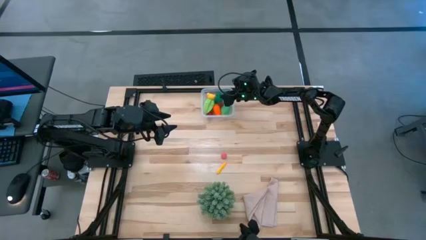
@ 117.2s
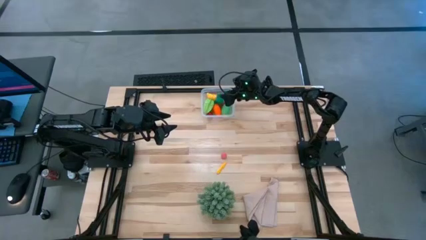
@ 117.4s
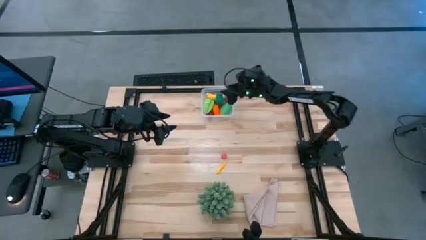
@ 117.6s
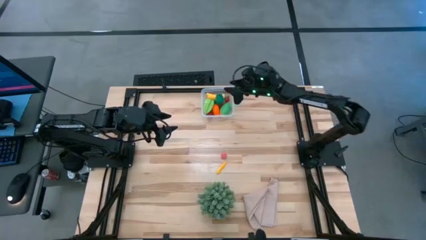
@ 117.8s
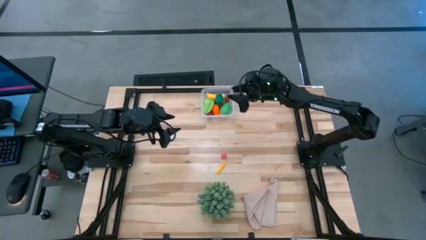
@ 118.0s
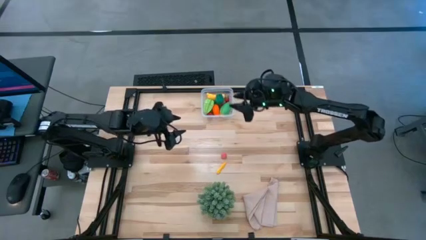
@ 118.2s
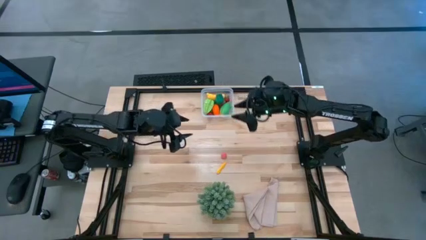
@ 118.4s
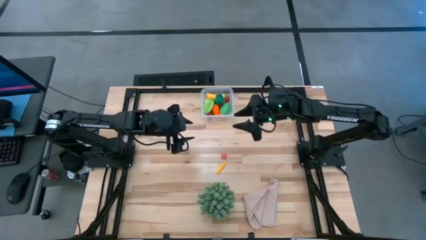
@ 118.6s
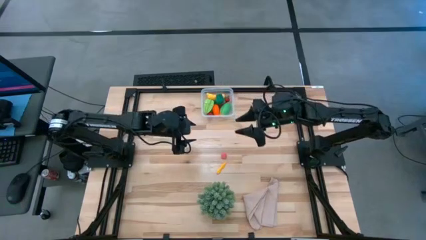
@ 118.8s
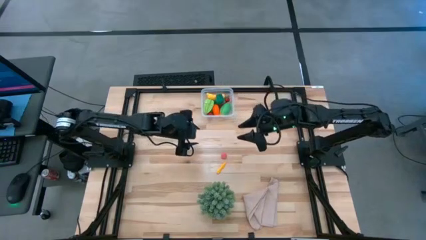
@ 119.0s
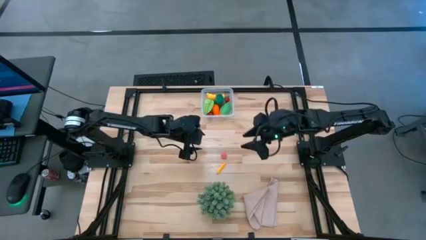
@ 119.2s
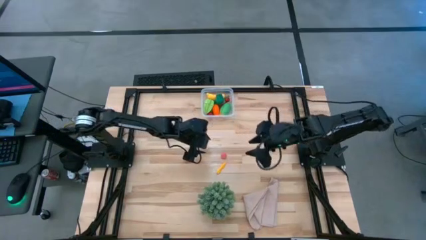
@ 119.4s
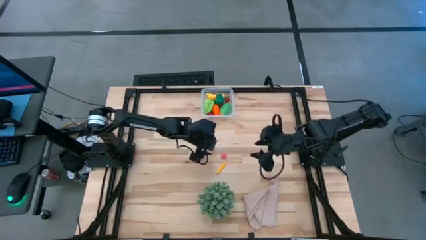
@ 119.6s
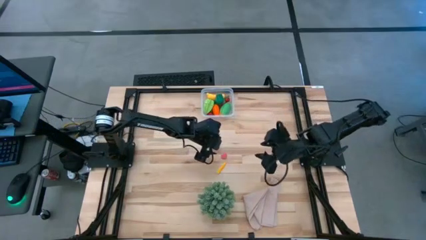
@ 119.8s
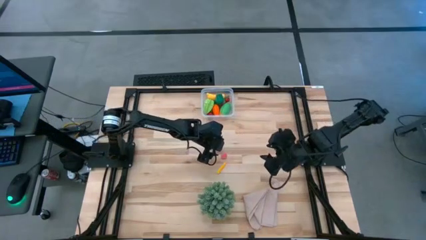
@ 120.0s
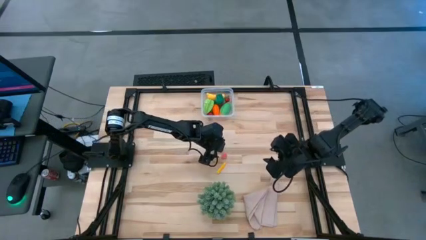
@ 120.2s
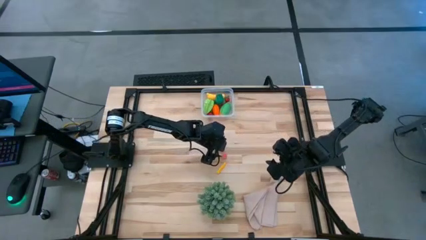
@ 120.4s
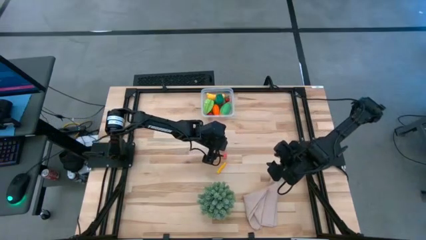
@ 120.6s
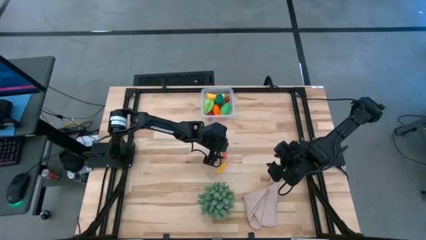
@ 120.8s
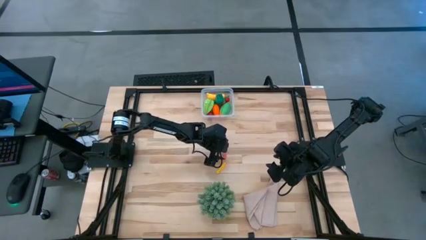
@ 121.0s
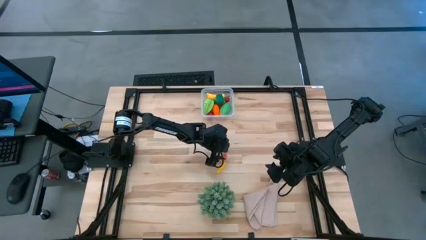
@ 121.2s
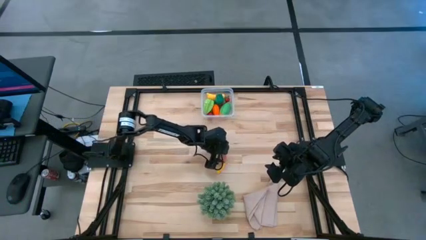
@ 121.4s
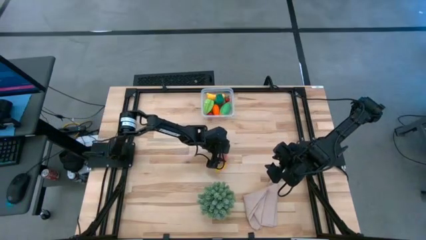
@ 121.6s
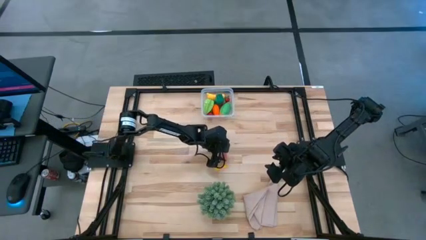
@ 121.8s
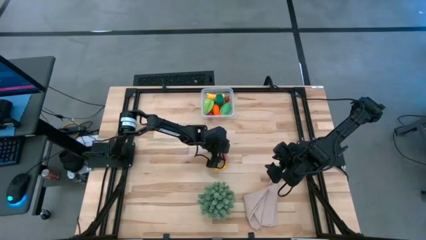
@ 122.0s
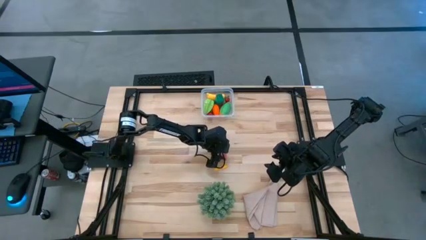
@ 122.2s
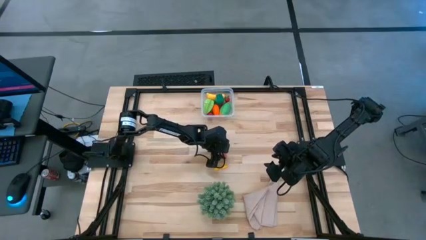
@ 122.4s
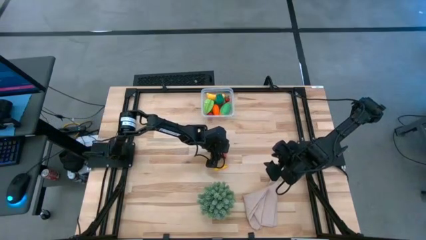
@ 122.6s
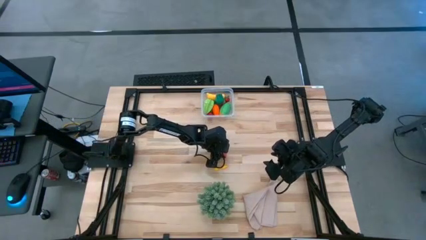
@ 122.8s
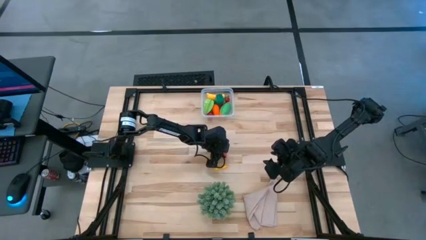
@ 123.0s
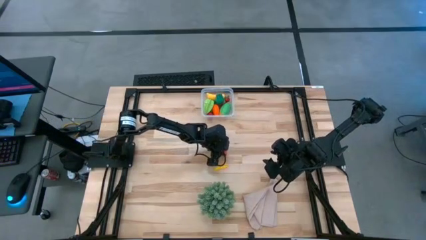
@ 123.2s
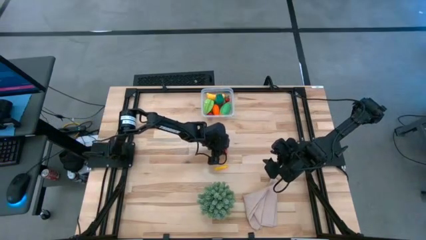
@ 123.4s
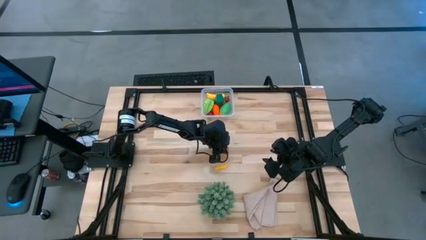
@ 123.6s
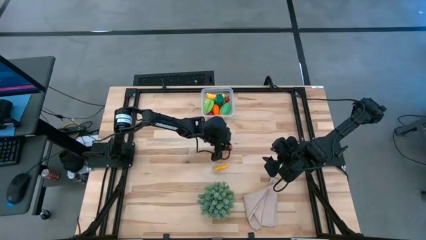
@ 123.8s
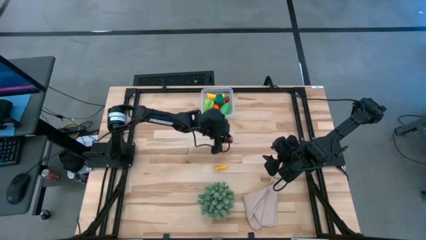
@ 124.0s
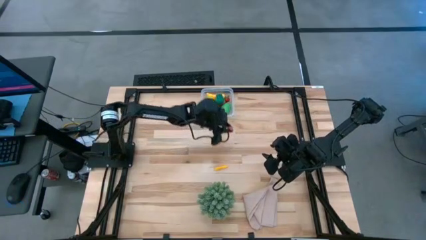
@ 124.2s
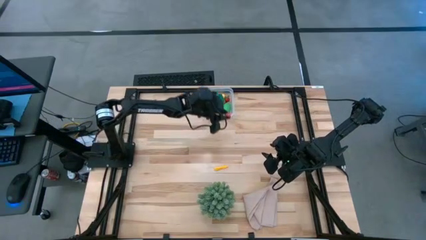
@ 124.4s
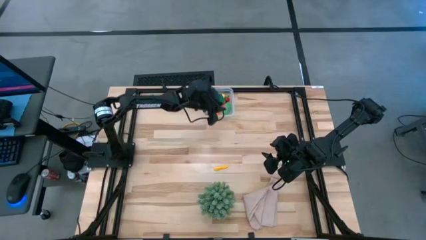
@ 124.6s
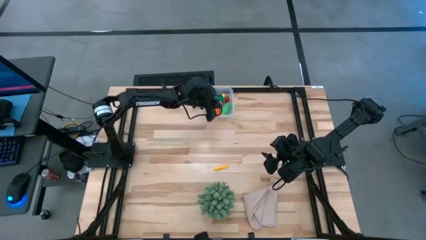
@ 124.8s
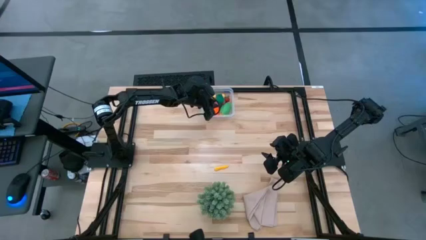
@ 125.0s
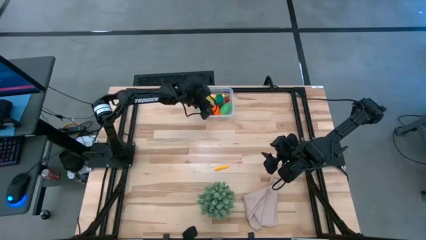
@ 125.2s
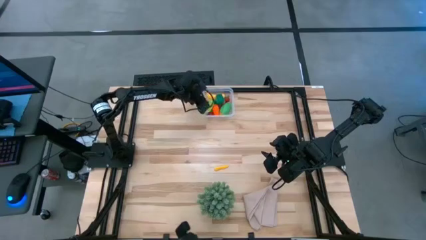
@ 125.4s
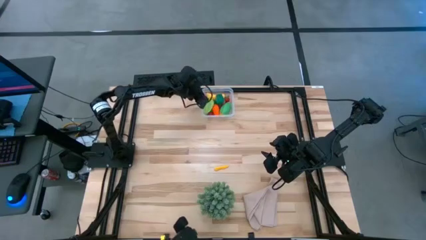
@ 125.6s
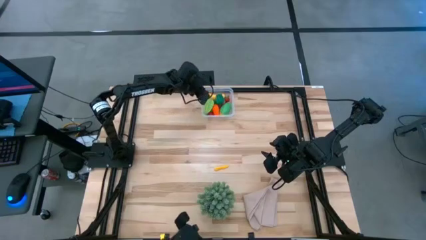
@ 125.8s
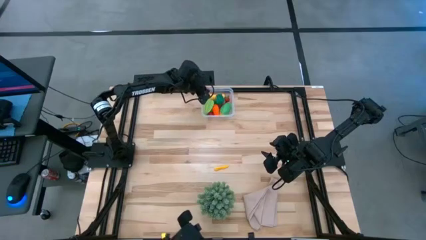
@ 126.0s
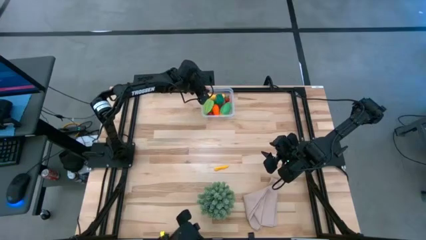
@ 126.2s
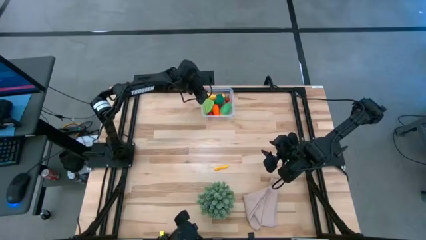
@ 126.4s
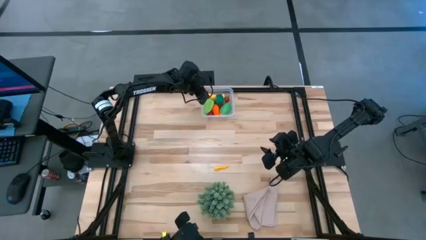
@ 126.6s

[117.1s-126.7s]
Task: Pick and placing Produce into tupperware
Put the peach into the transparent bin

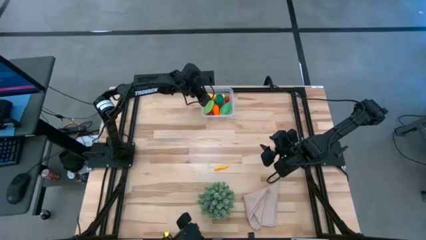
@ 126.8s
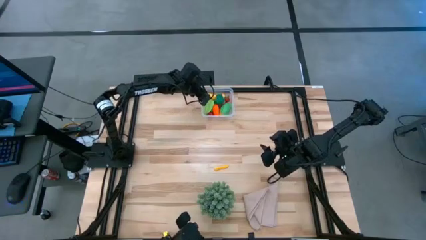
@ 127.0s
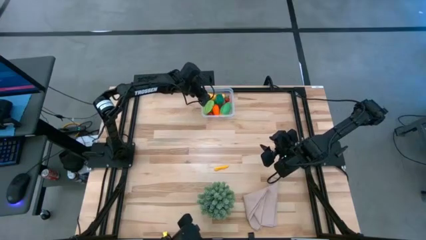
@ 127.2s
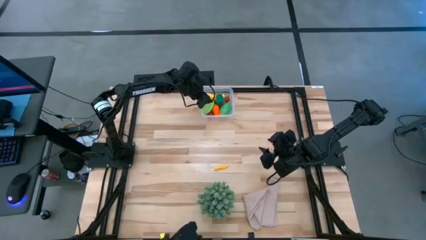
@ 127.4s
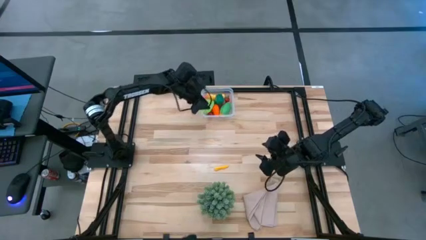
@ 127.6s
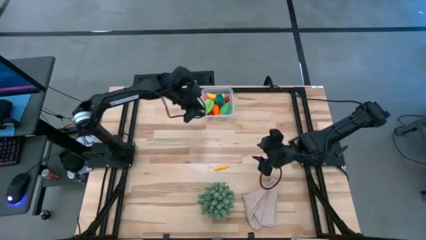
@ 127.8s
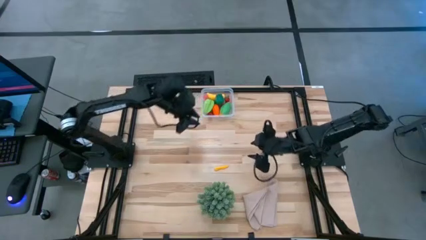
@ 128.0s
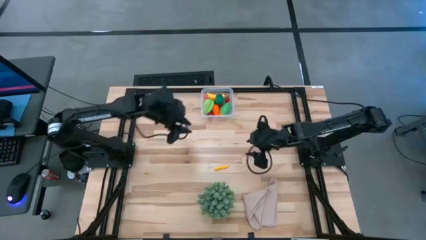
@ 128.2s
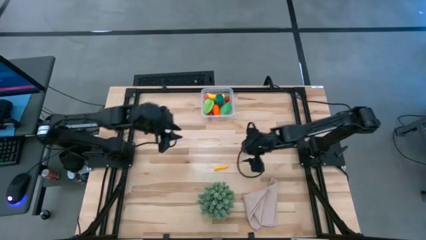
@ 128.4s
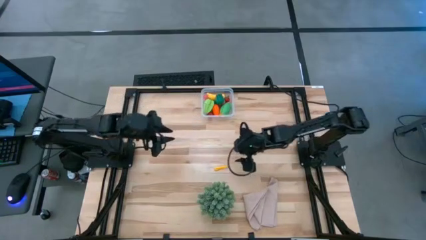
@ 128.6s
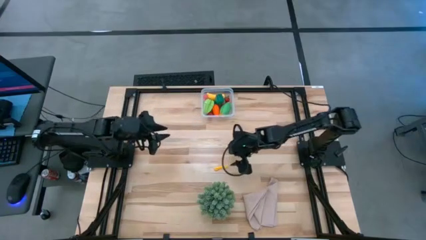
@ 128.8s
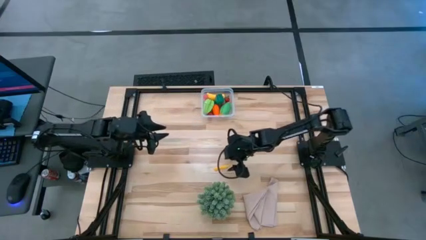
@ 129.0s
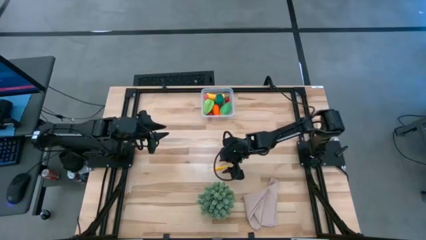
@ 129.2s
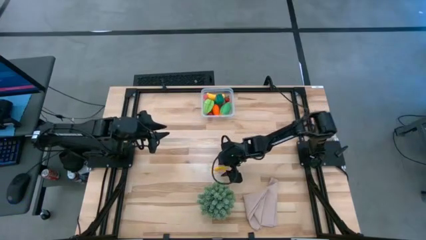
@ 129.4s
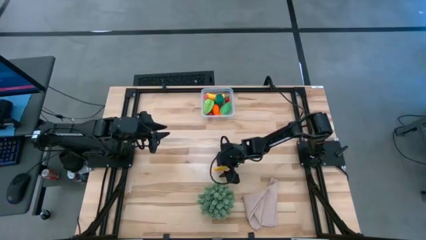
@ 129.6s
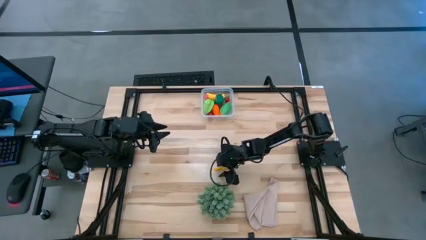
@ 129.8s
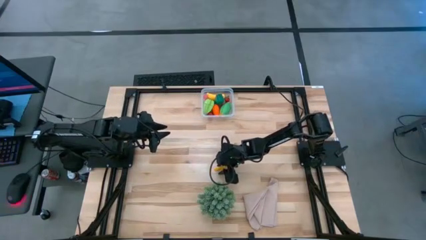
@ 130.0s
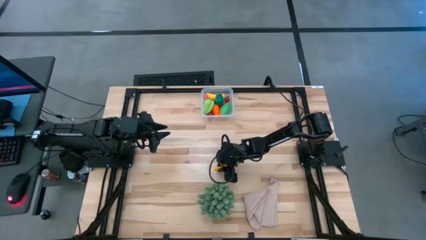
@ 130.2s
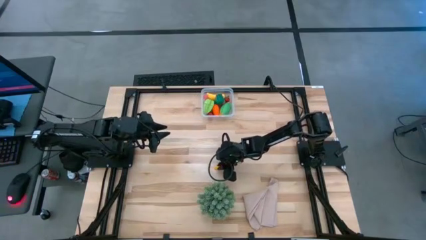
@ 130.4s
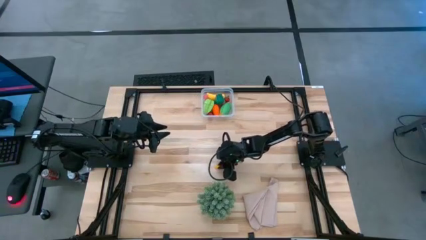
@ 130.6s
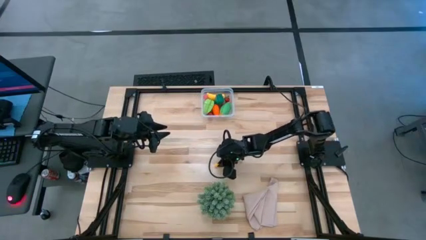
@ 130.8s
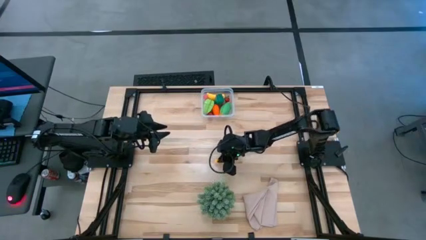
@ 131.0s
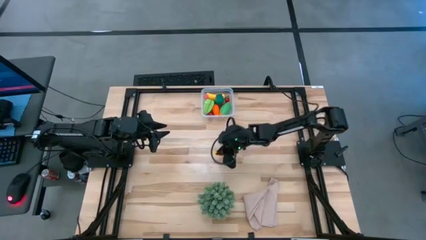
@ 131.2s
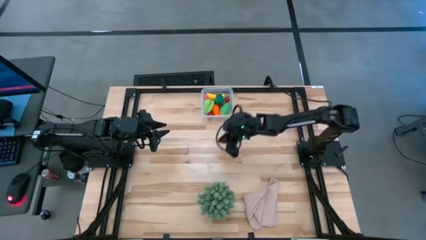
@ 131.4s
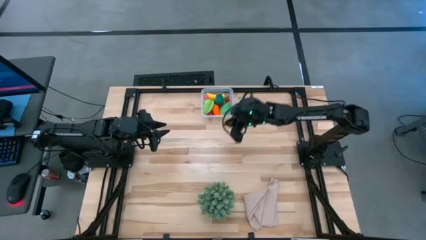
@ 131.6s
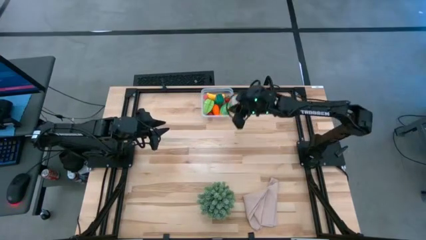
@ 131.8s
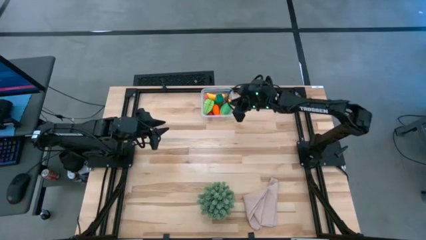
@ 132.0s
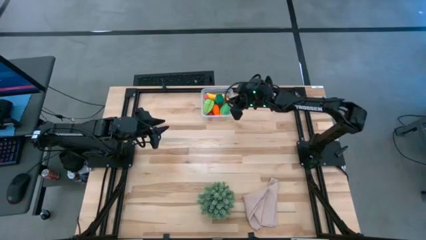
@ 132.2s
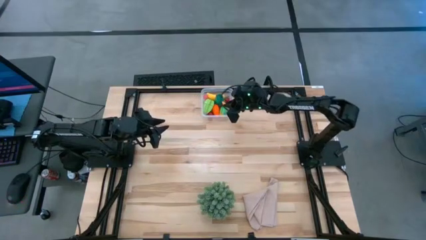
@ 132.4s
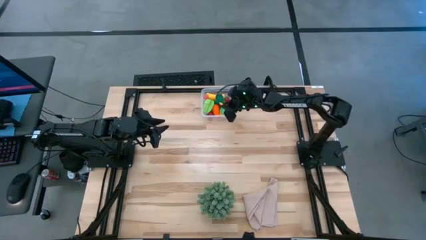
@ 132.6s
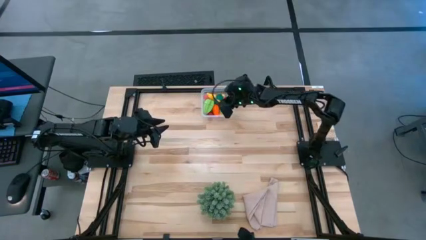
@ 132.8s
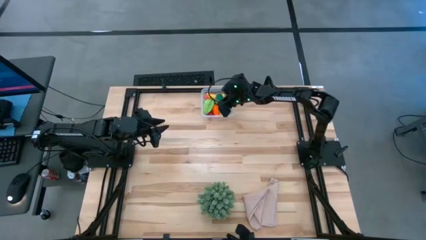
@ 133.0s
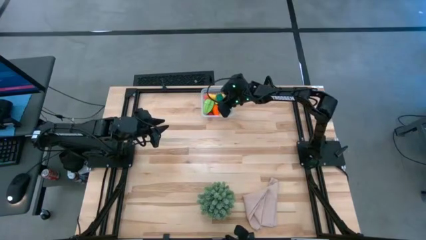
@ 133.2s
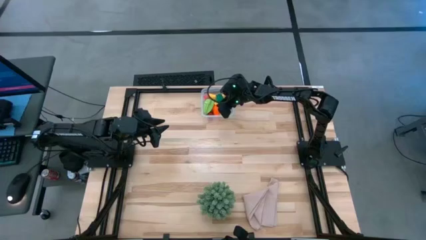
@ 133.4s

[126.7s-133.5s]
Put the corn into the transparent bin

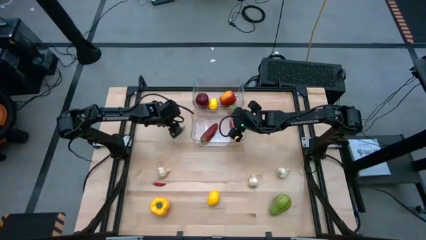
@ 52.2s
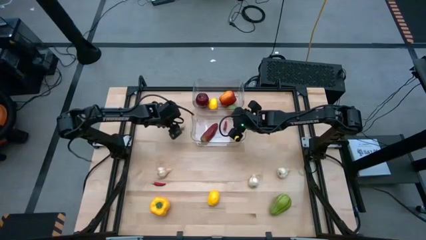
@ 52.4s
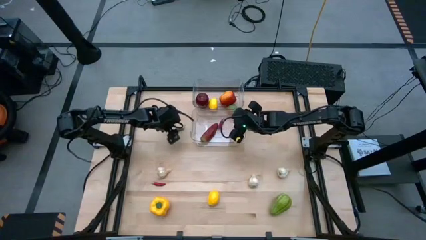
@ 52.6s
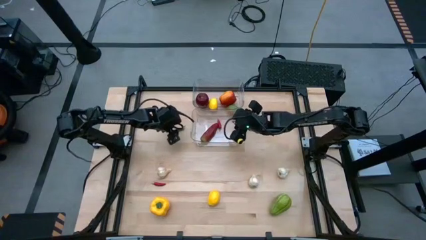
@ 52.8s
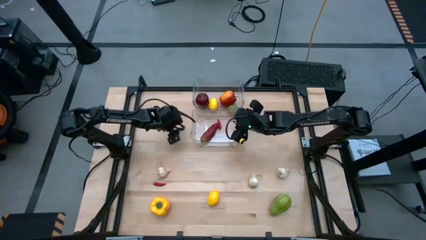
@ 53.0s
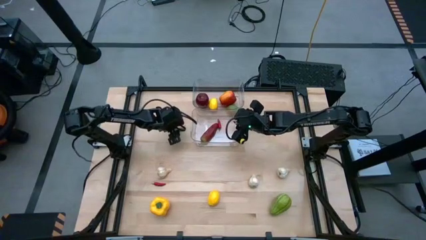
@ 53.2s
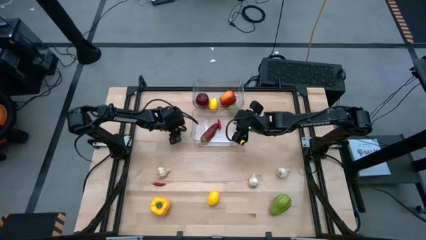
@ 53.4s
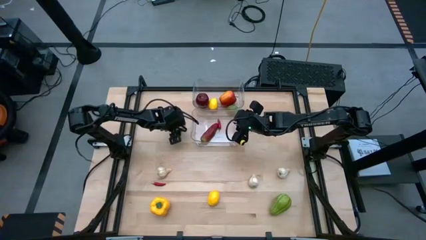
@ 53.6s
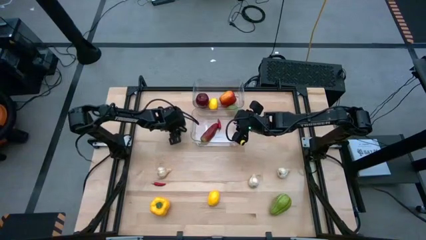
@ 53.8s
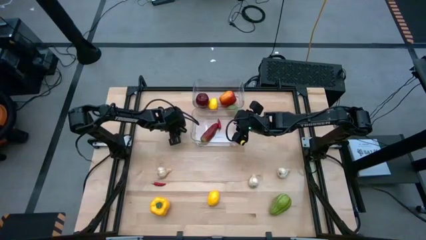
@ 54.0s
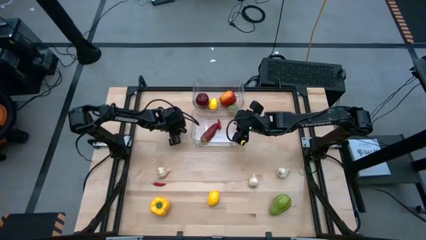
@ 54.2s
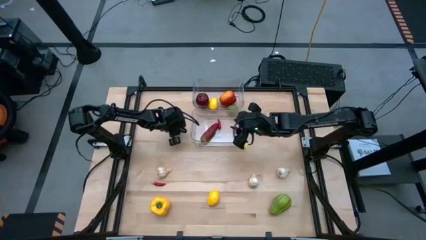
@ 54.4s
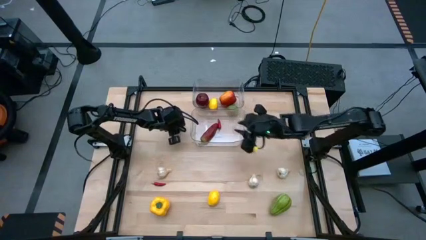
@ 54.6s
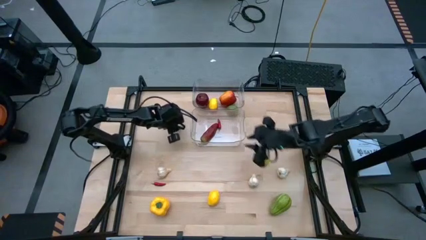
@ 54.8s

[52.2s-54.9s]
Task: Sort produce into baskets
Put the green chili pepper into the bottom transparent bin
